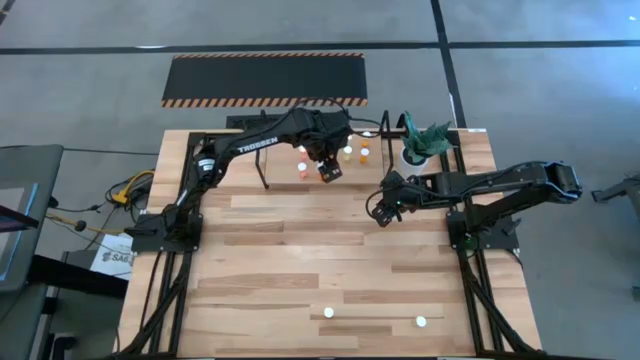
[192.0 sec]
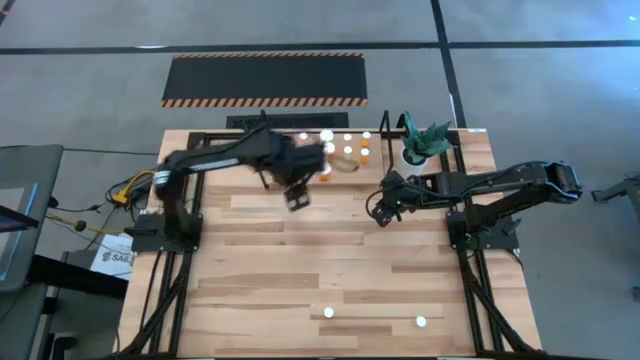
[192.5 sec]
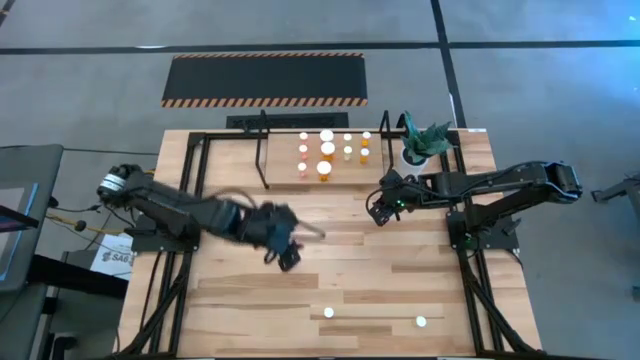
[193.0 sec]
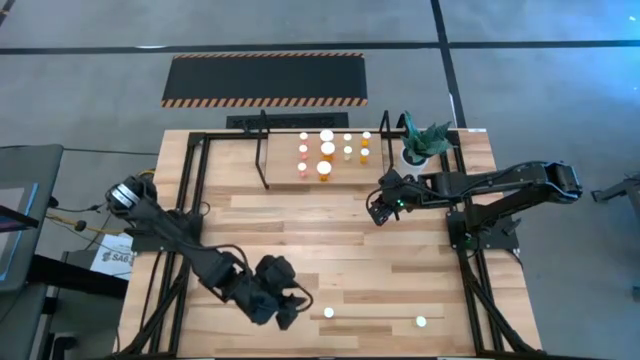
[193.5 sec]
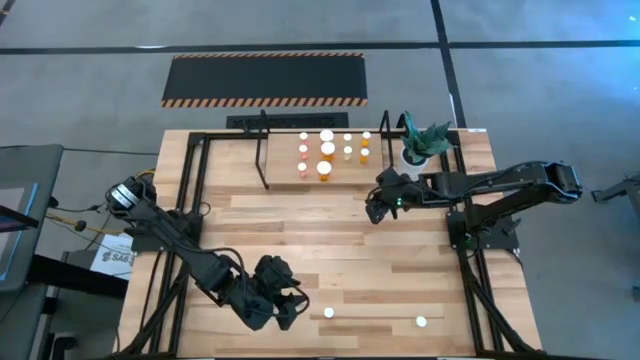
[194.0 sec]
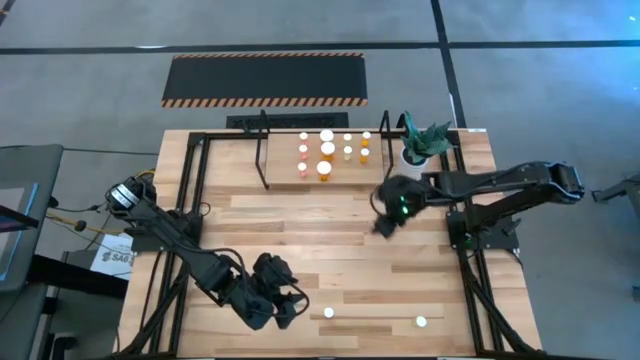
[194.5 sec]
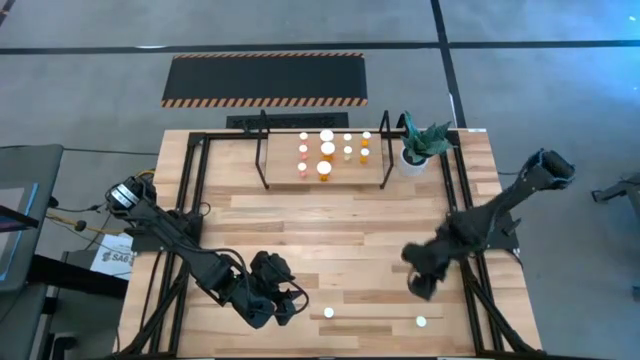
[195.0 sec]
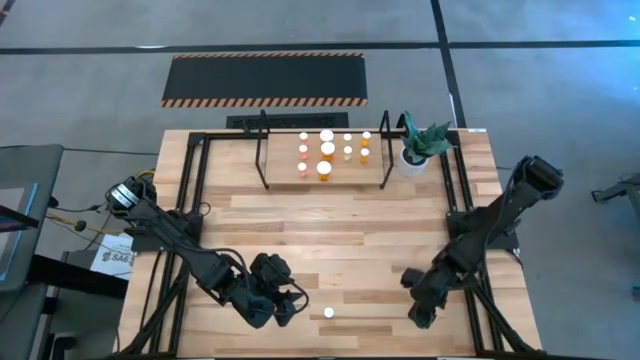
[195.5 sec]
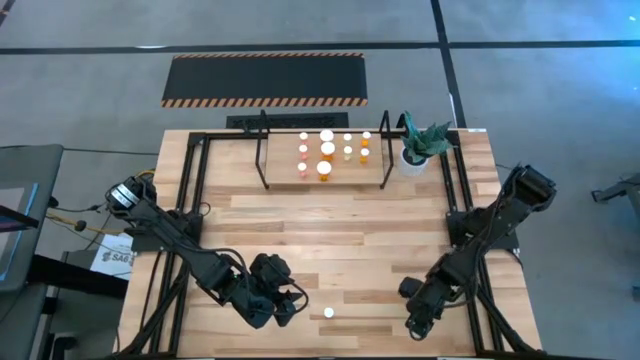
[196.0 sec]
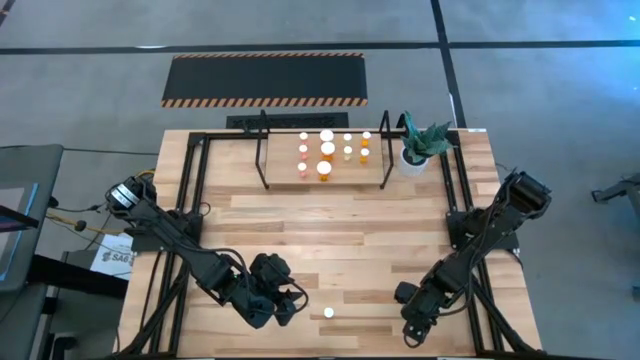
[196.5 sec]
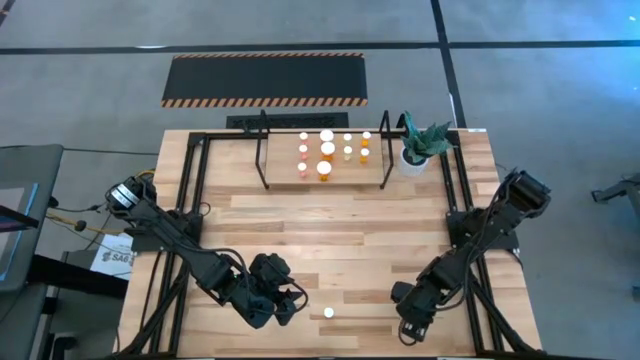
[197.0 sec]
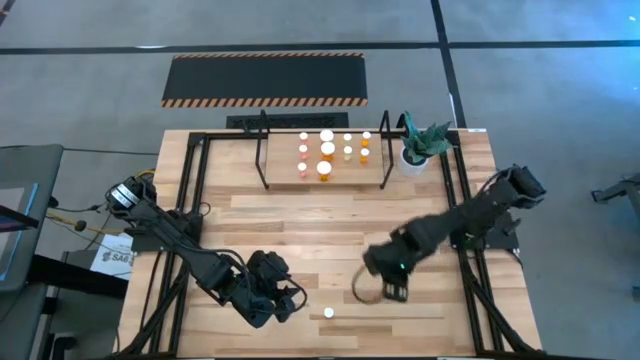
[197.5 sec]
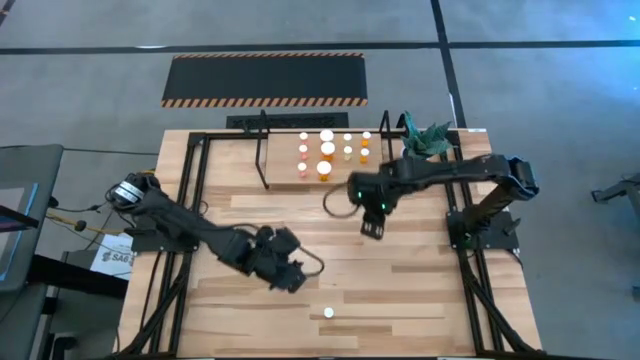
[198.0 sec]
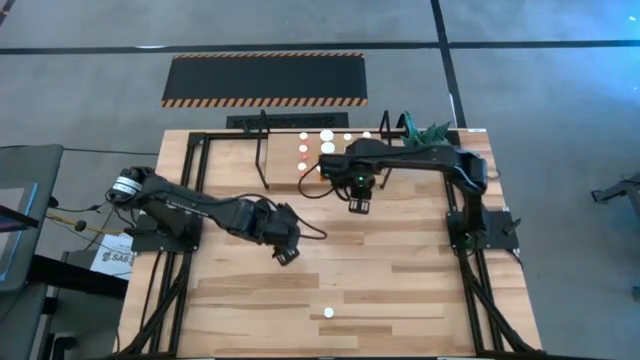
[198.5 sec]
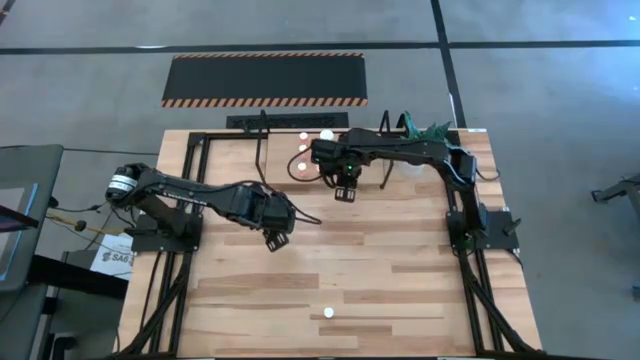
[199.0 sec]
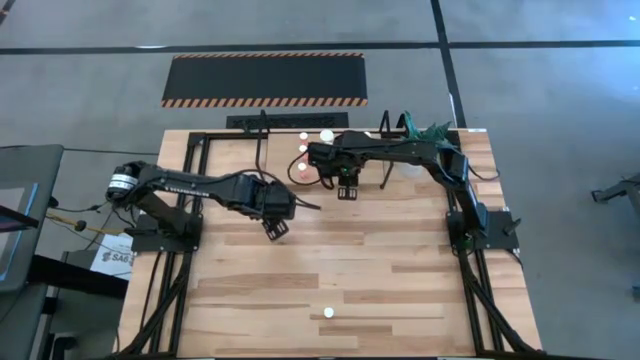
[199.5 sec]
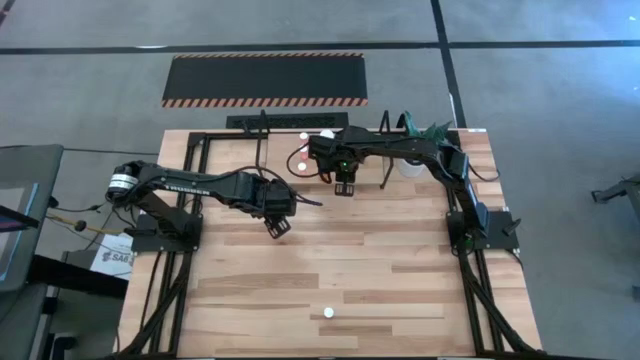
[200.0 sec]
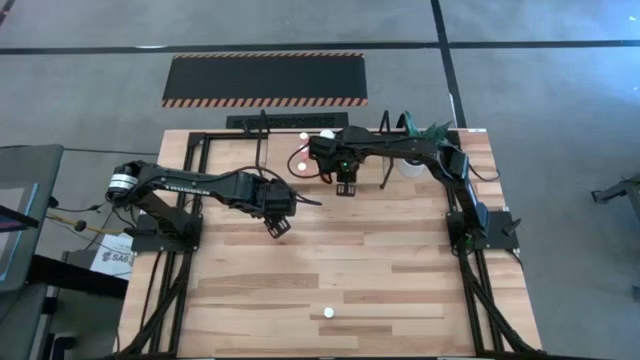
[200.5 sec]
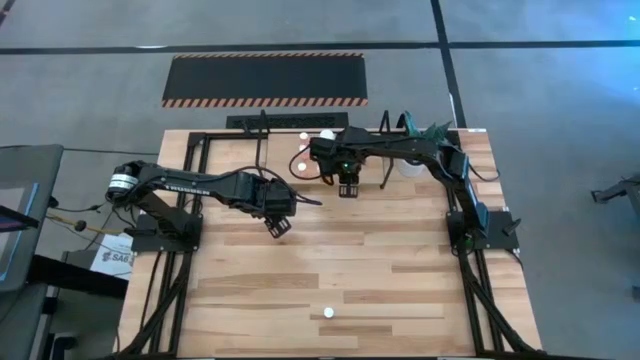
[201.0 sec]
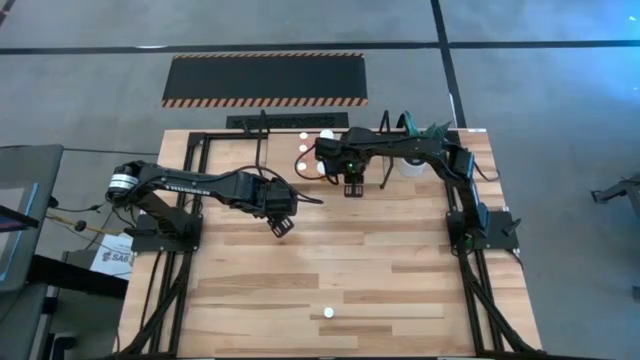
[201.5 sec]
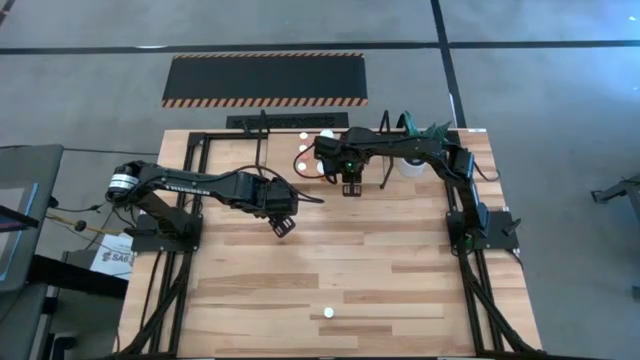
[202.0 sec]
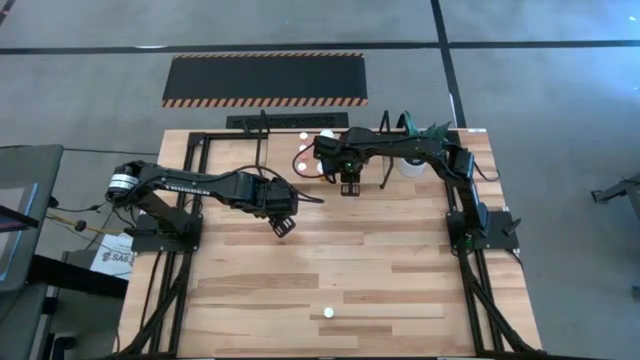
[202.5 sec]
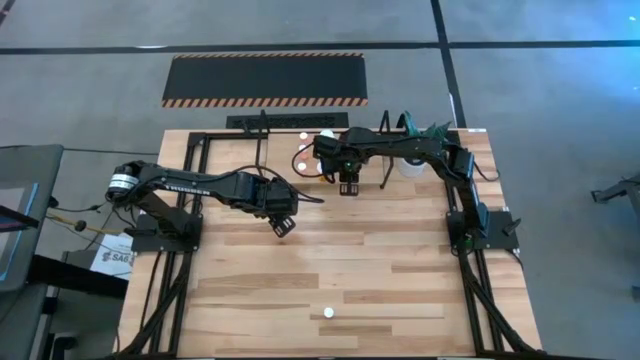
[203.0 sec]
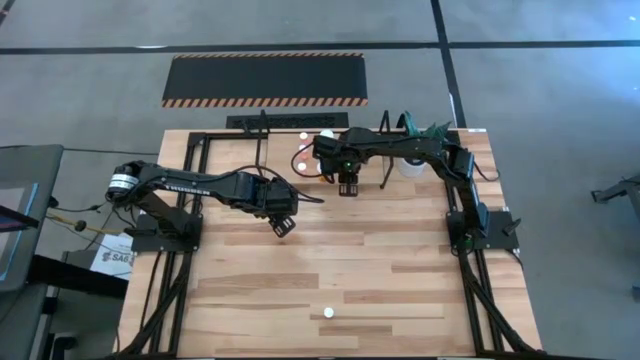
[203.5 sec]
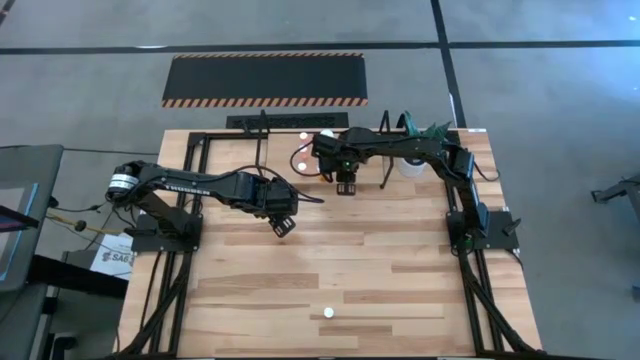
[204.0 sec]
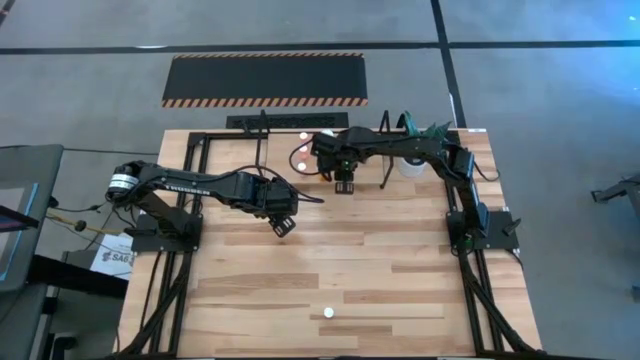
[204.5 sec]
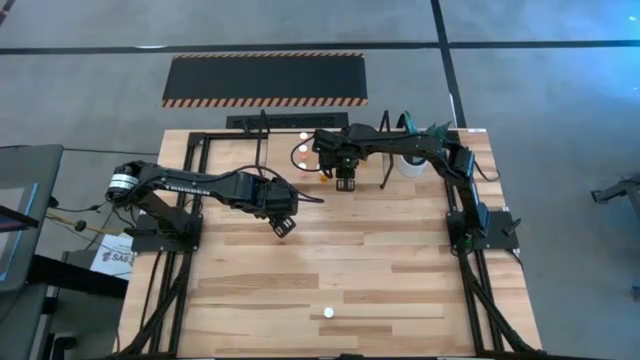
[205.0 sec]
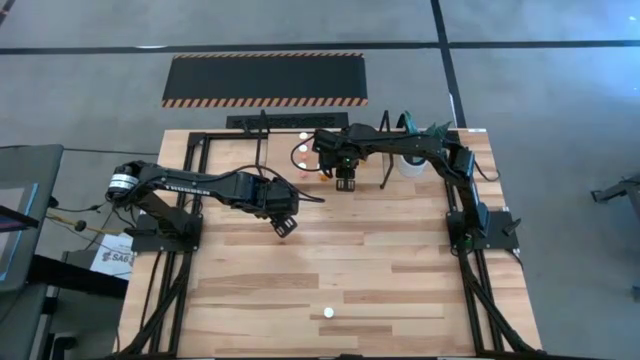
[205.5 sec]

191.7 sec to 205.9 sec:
Task: Pick and place medicine bottles onto shelf by color
Put the yellow pill bottle on the shelf aligned with the other yellow pill bottles

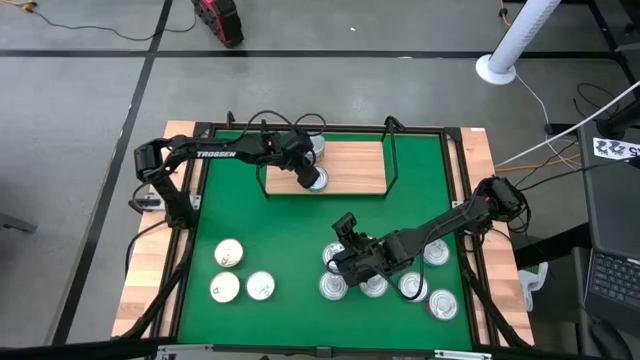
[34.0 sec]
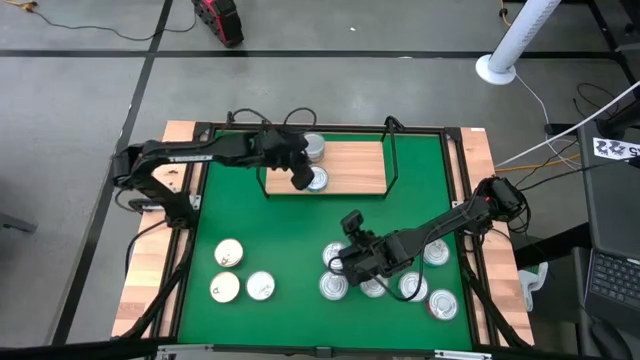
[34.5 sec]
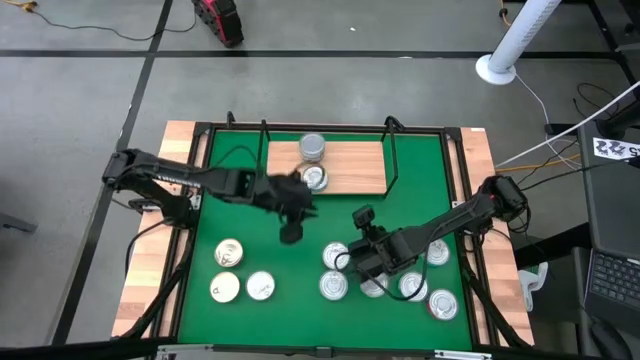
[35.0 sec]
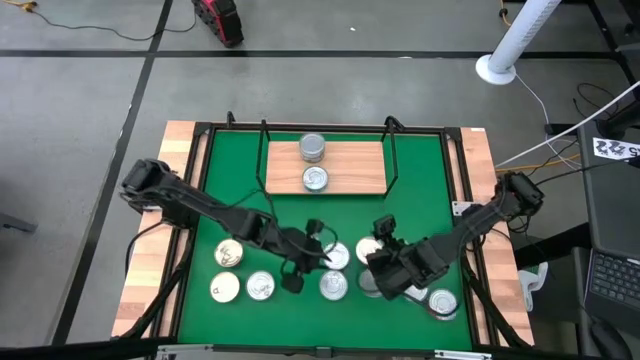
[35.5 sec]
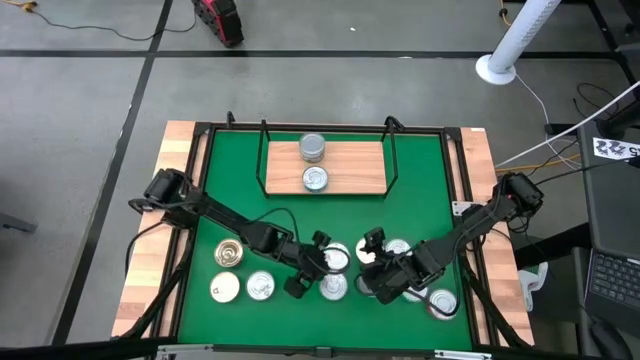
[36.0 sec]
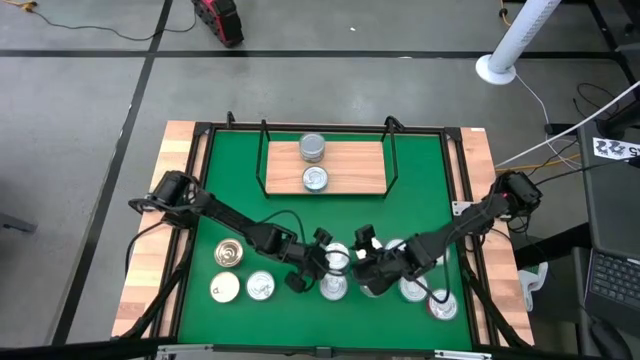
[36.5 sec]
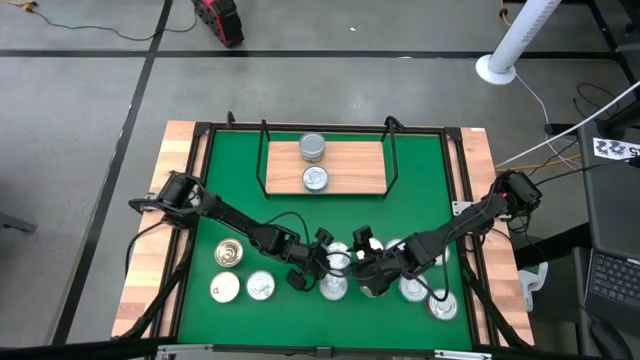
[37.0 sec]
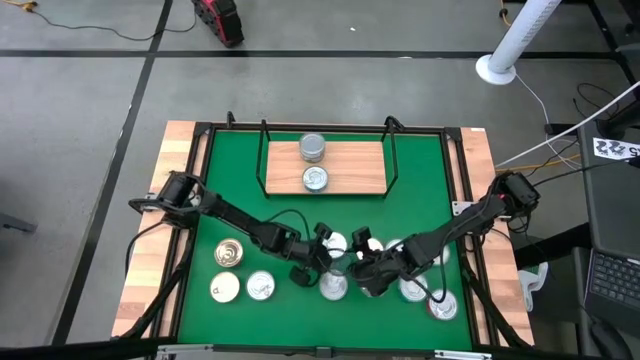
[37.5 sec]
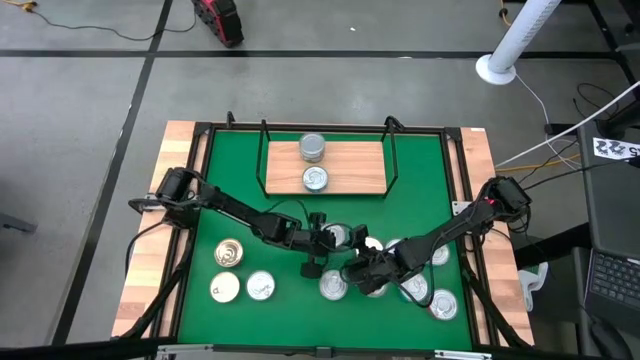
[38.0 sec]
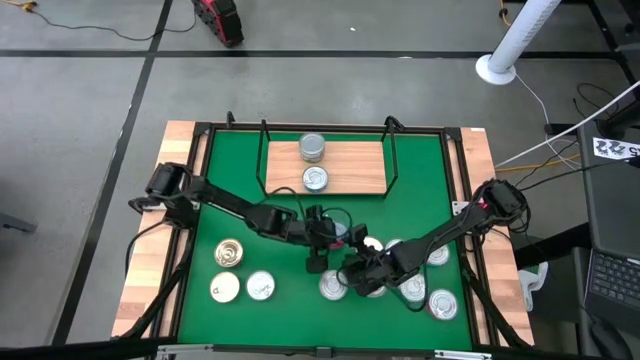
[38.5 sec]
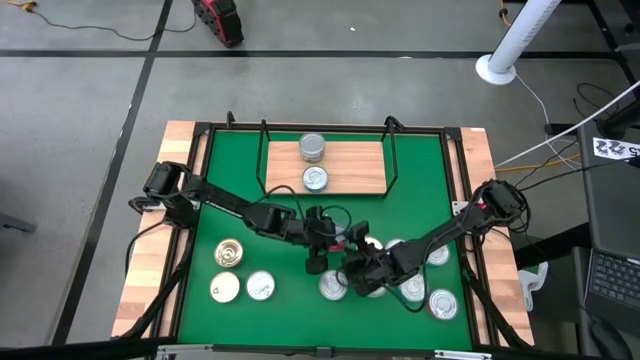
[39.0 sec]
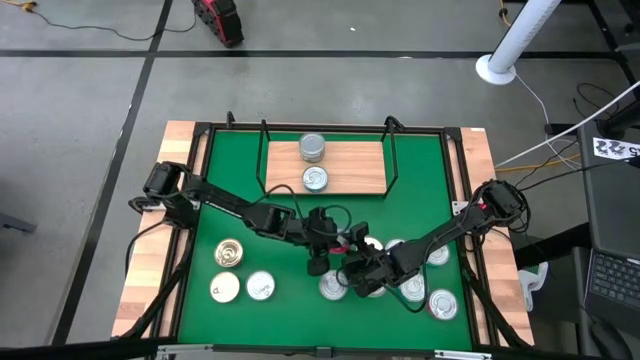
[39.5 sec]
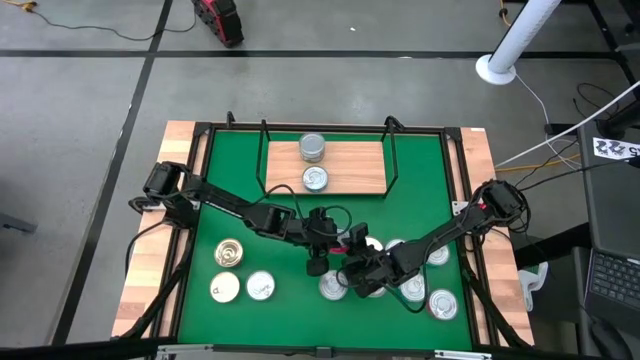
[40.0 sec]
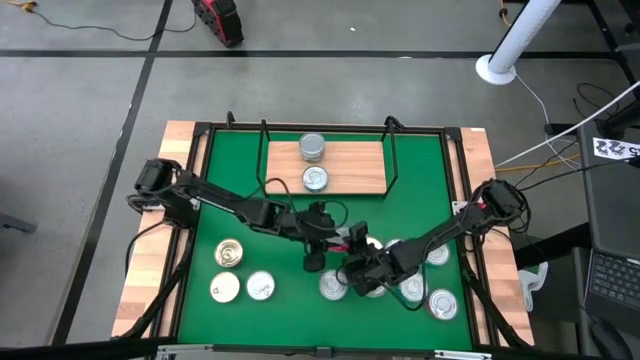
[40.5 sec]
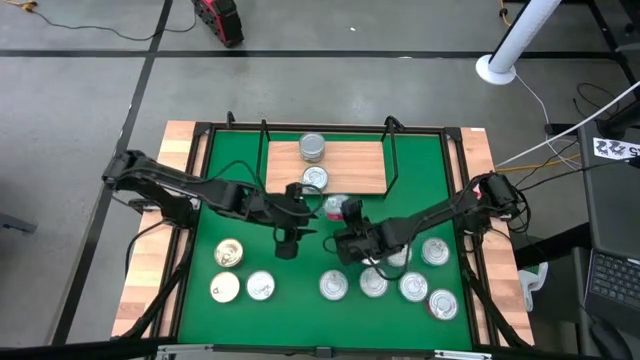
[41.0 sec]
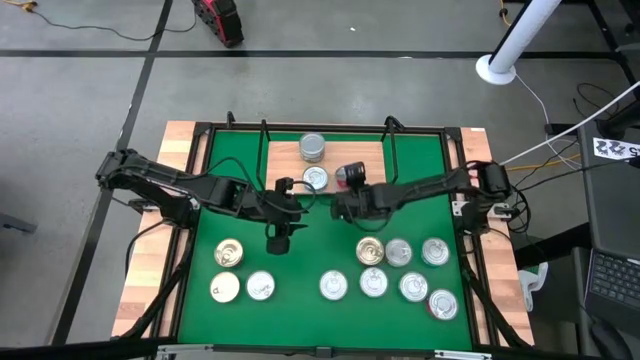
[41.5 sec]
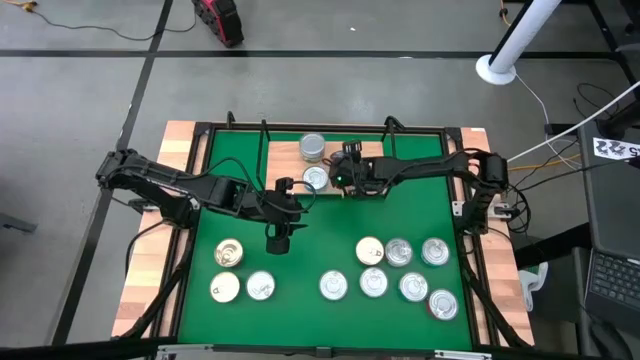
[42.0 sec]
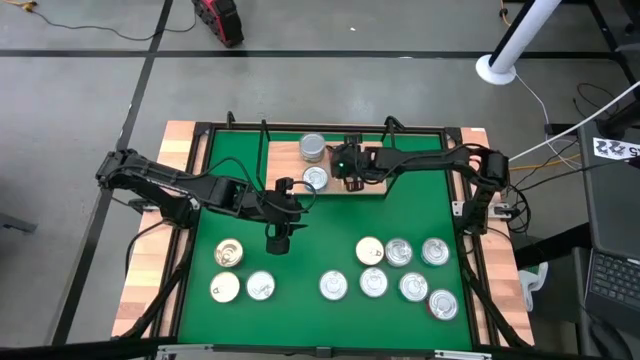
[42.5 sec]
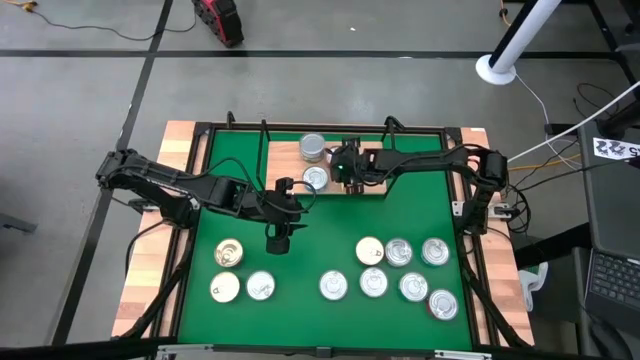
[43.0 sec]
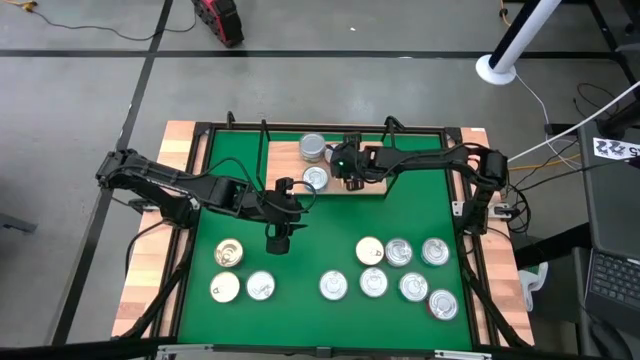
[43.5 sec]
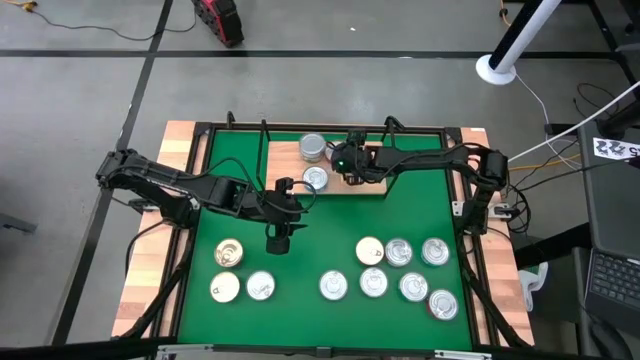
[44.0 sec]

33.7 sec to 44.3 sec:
Task: Stack canned seafood by type on shelf
Put the red tuna can on the shelf
